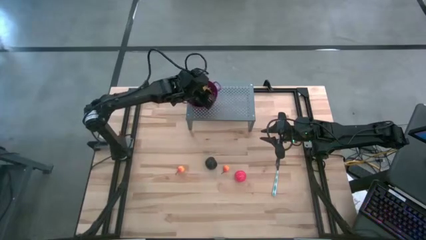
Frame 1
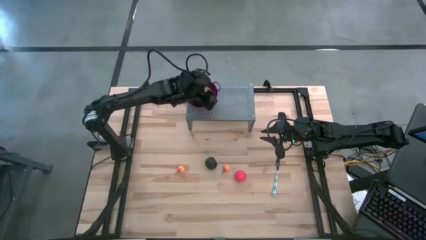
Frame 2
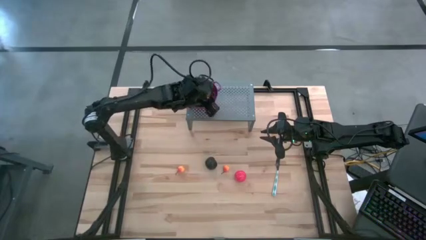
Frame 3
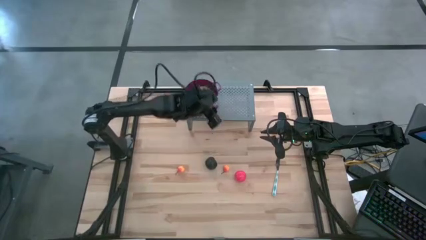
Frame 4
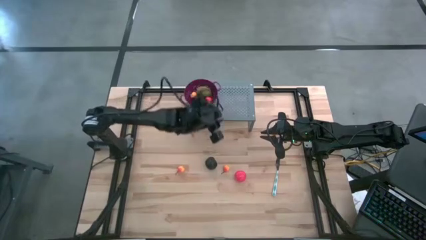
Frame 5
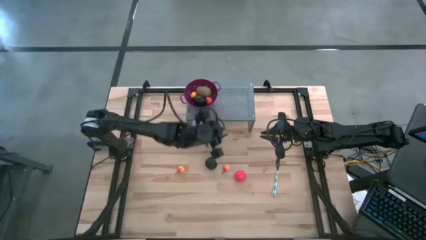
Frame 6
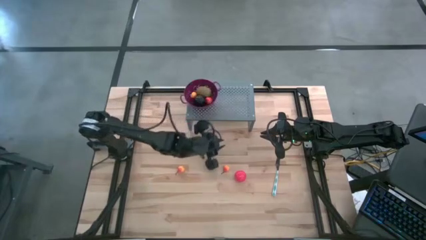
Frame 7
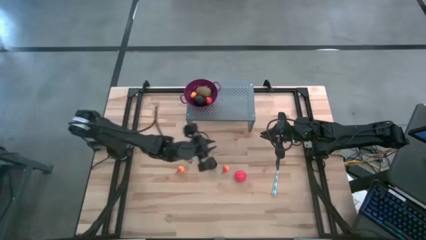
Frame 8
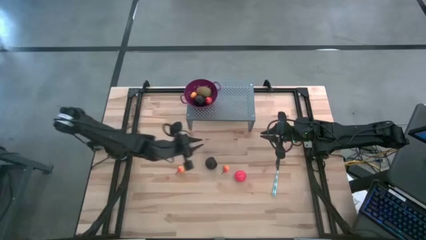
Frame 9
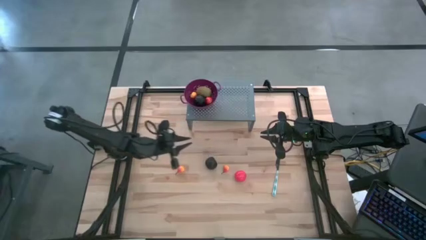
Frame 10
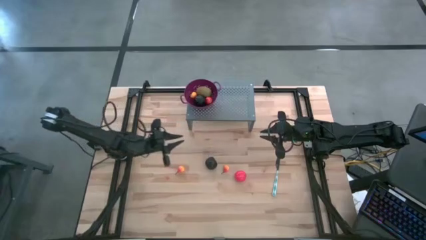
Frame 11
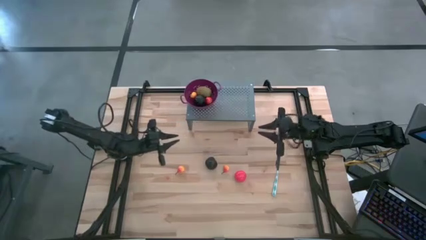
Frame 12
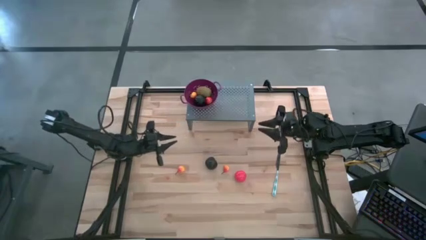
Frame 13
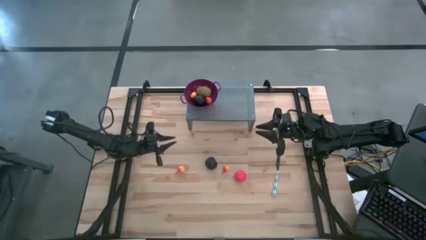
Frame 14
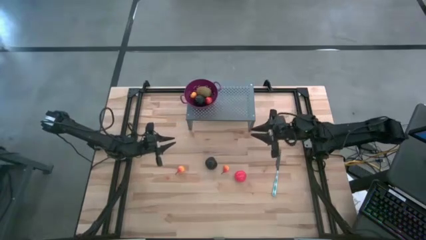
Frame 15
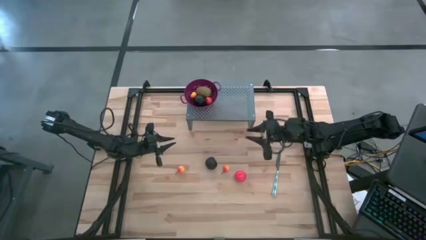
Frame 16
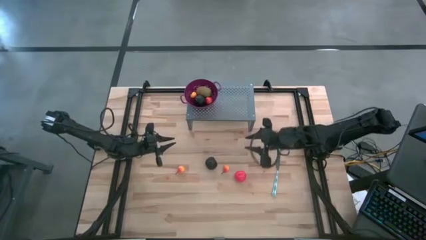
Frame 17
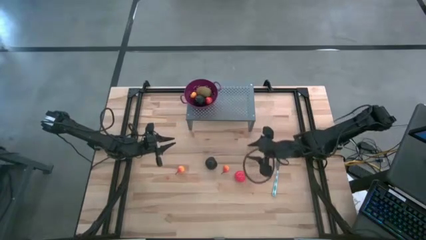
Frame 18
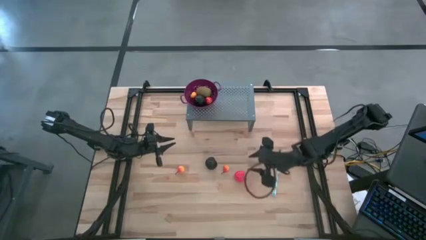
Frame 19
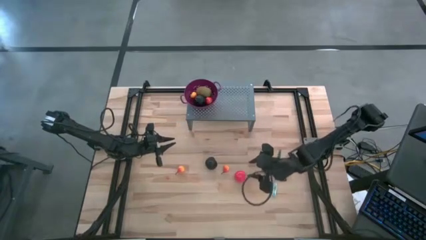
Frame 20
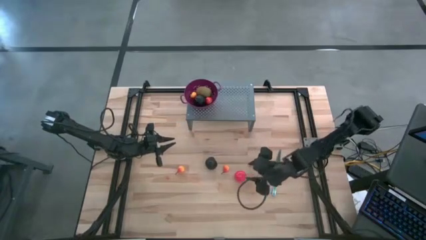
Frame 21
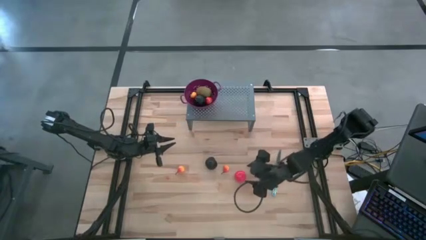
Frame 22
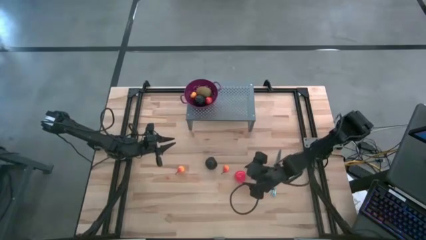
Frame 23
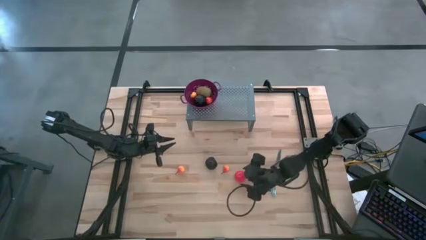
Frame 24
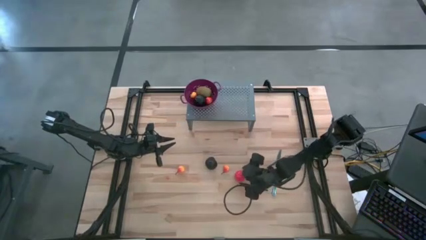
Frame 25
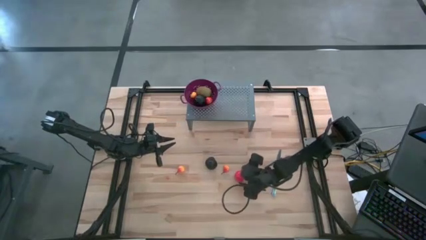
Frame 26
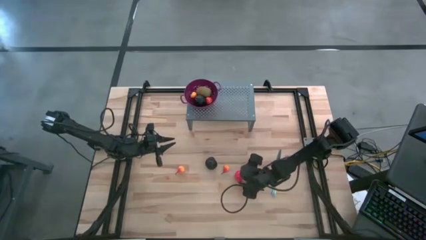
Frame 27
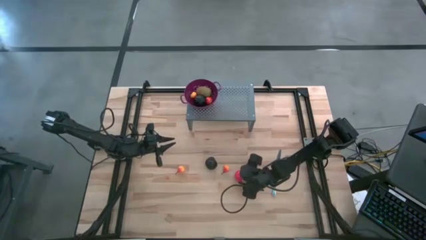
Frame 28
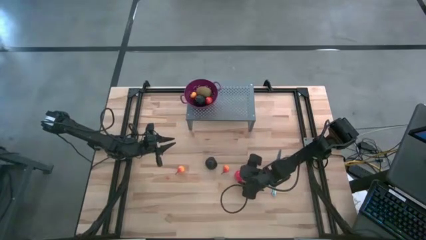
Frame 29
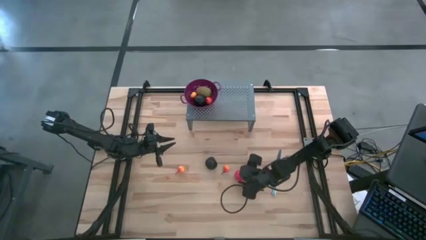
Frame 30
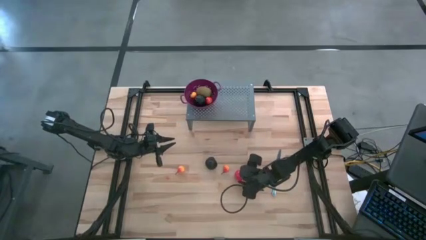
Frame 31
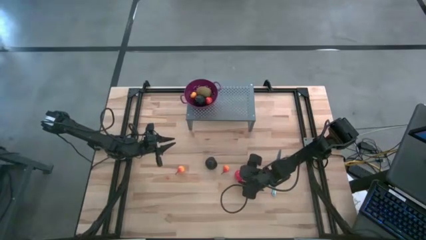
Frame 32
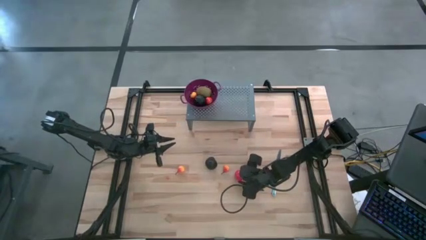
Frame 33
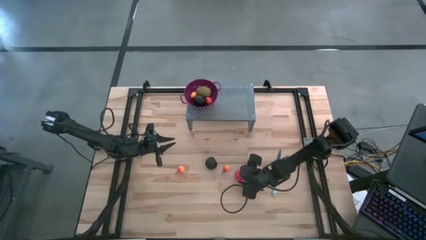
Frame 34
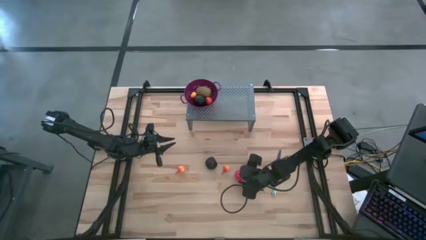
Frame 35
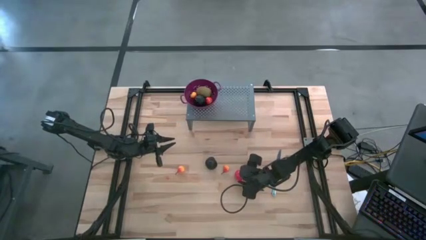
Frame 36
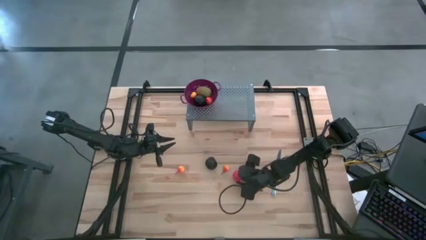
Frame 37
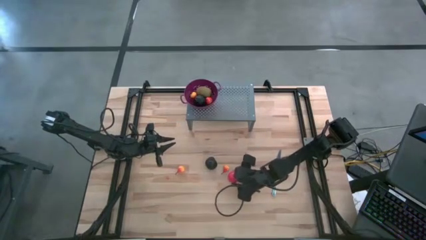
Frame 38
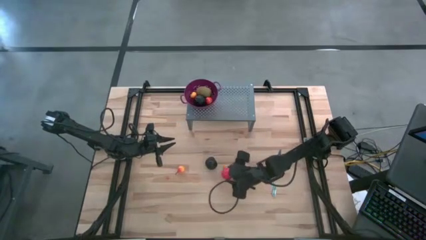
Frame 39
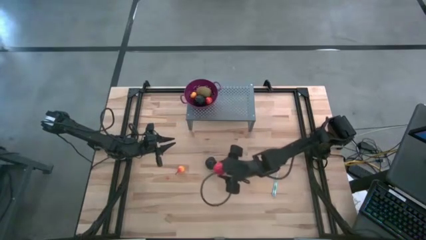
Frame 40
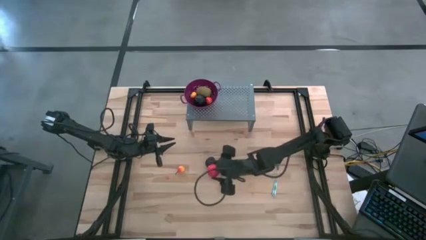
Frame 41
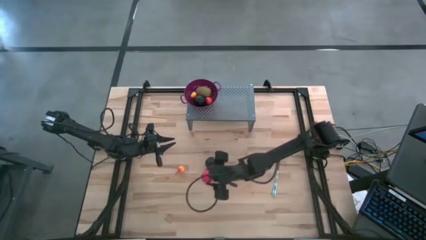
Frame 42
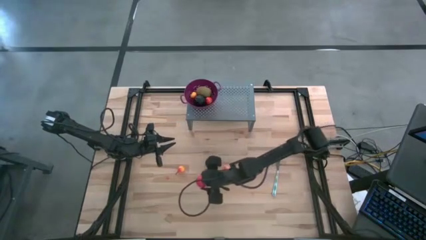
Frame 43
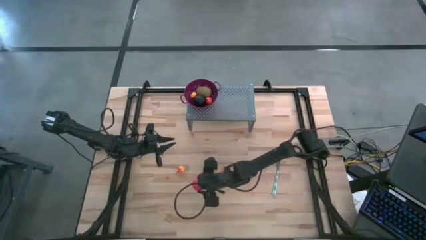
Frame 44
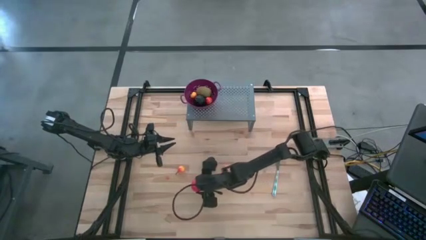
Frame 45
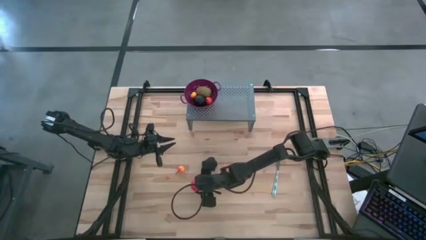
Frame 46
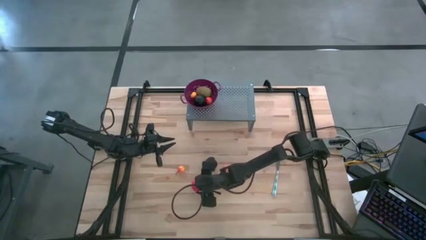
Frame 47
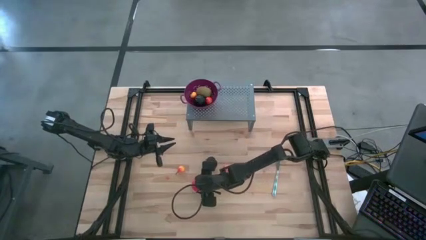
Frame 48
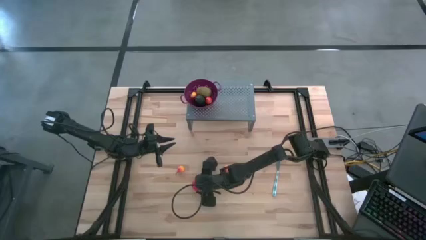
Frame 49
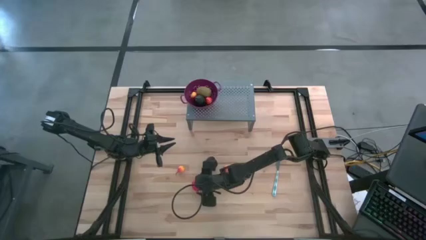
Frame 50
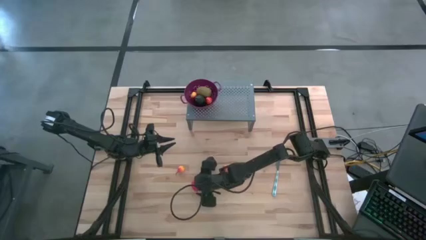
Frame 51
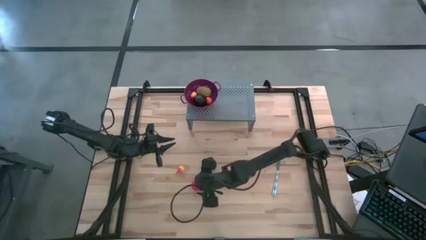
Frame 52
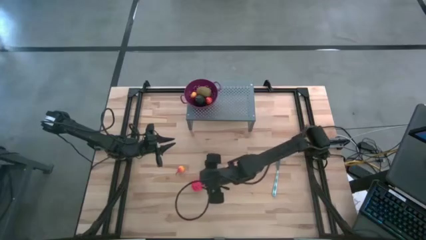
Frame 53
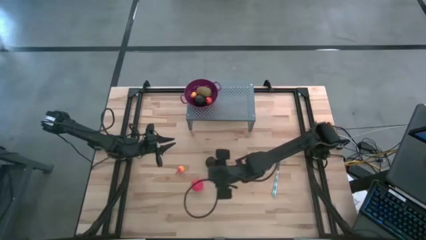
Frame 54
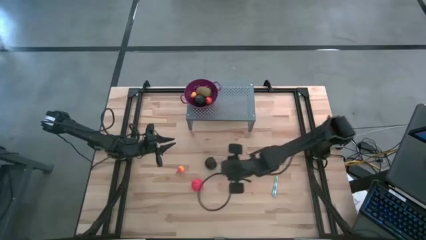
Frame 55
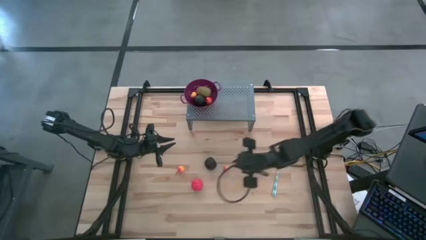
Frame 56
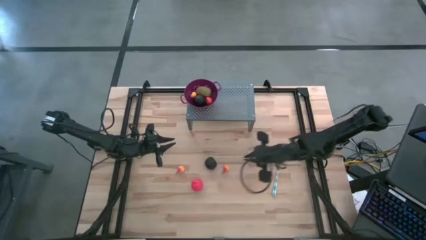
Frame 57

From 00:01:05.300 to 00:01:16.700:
Task: Pick & Place Fruit
Put the red tomato into the purple strainer bowl on the shelf

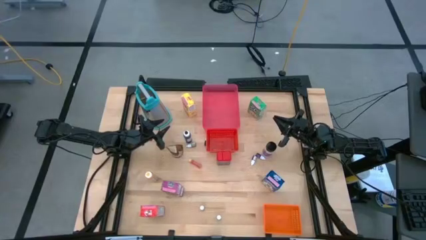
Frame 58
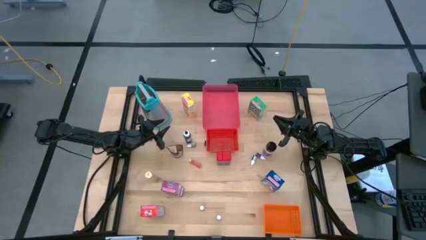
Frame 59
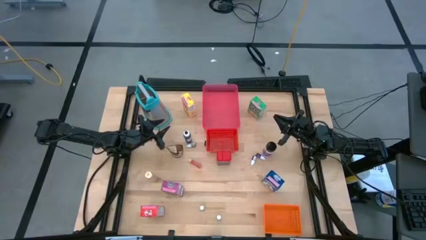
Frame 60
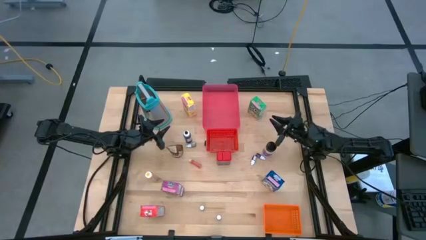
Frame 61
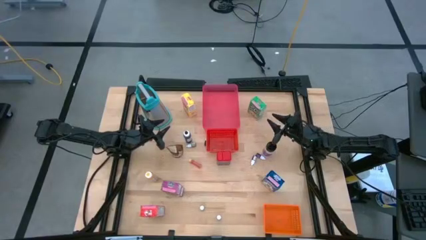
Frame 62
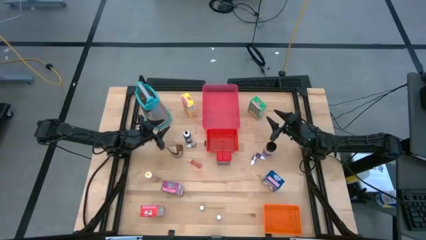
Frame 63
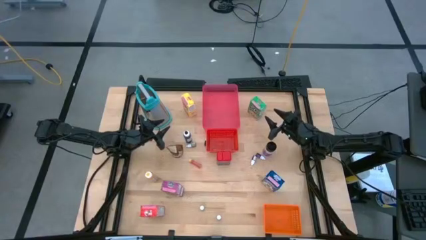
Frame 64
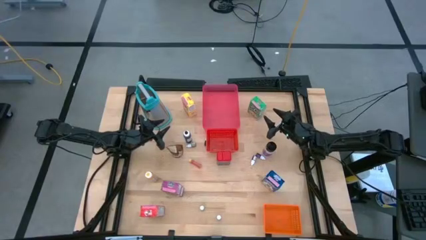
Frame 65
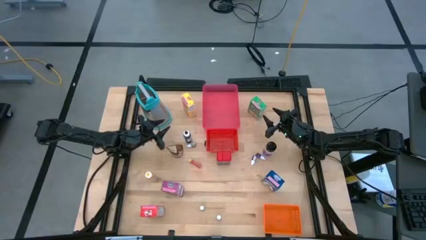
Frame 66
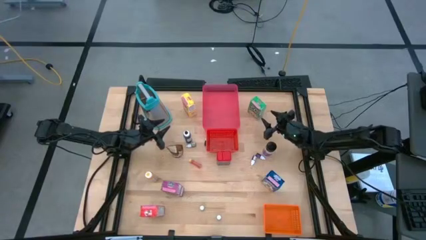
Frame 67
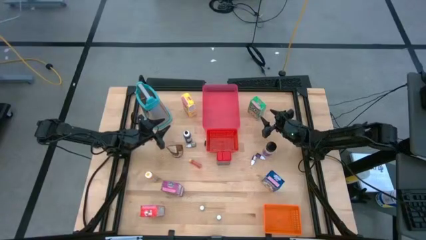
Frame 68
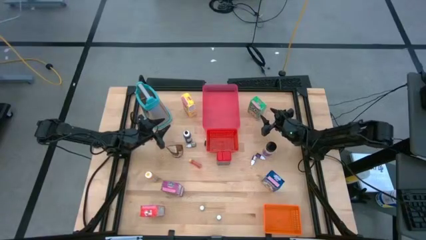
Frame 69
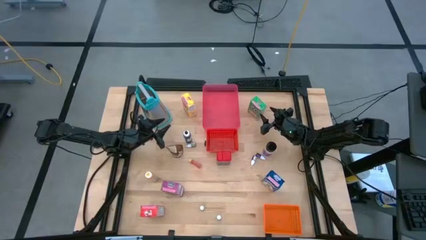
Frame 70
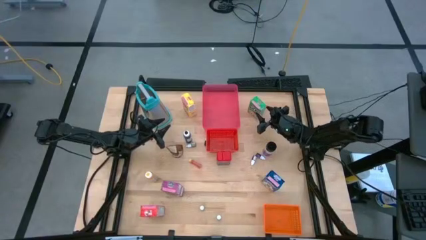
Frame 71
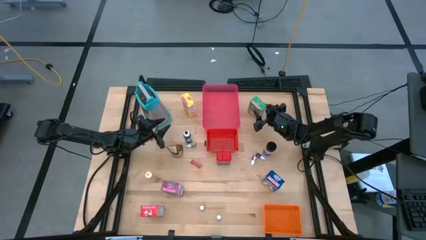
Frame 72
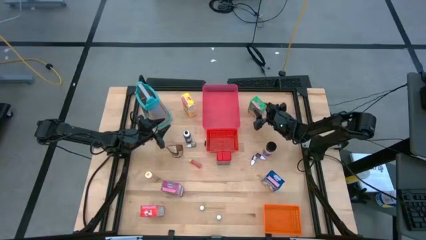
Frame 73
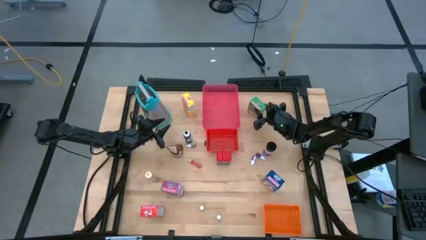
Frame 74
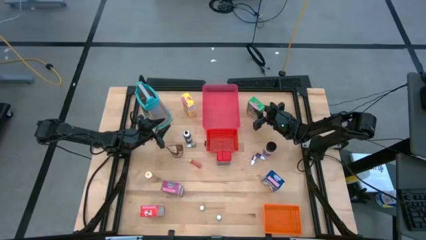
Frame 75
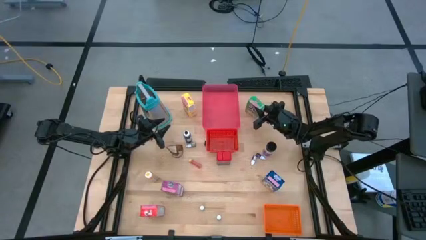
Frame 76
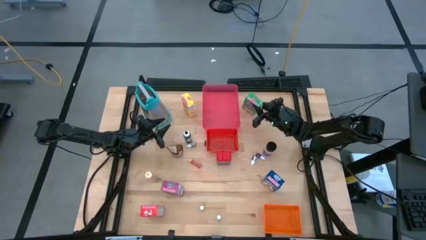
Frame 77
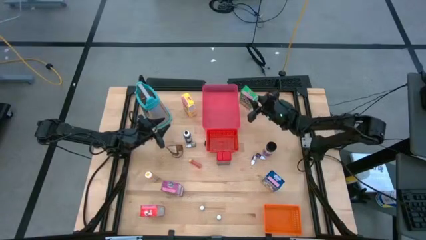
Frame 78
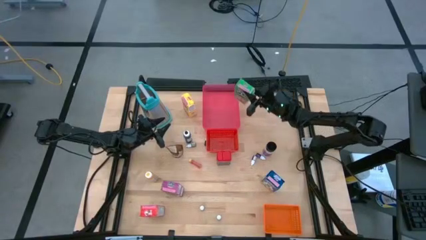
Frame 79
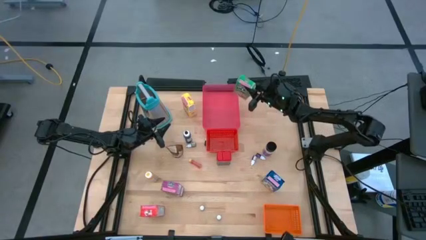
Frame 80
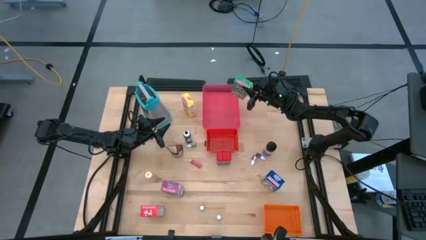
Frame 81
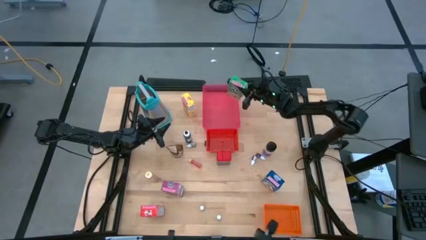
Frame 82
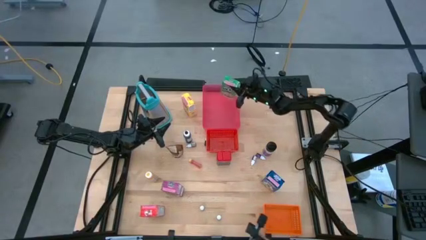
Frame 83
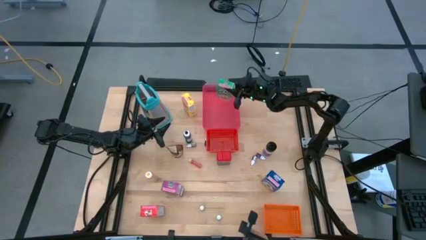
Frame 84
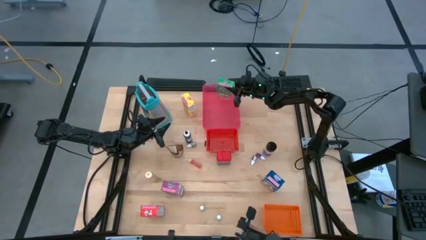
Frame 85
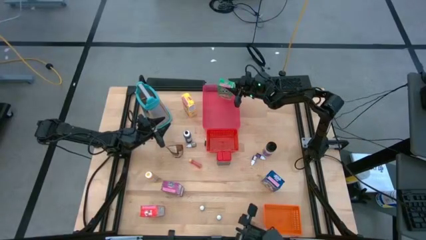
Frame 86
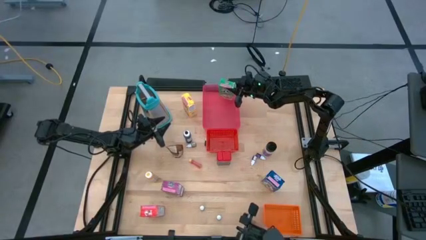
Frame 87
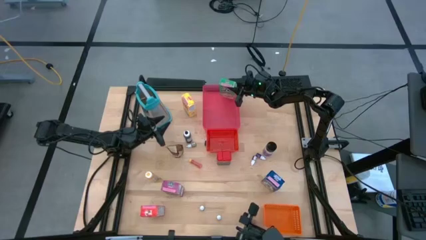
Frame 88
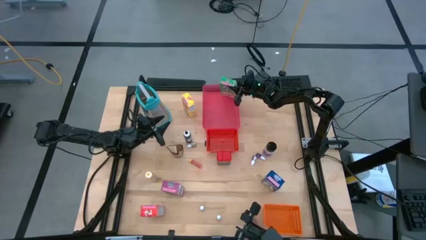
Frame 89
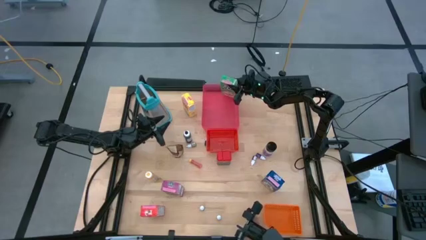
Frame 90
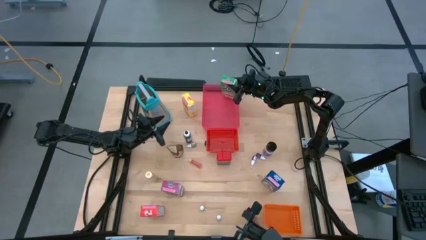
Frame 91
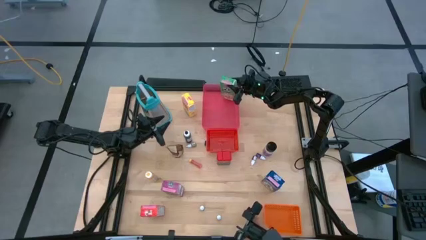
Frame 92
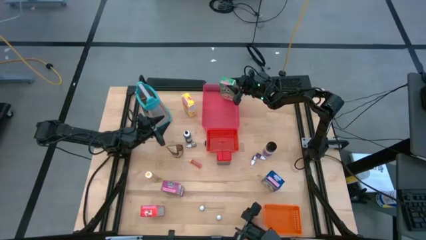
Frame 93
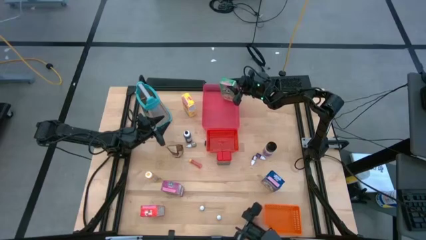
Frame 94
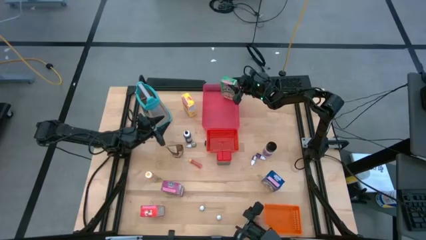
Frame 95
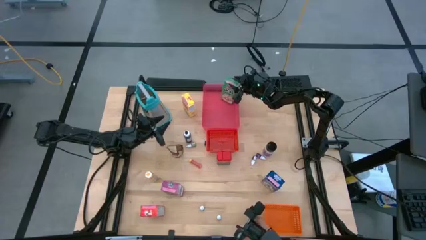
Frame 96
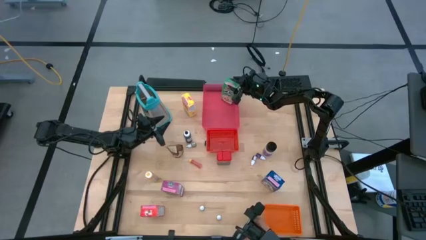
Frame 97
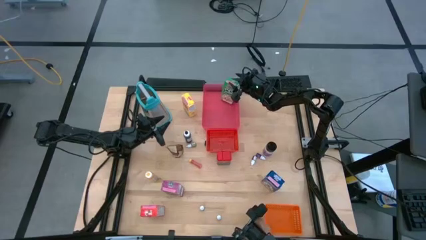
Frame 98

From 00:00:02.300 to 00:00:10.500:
Task: Pick & Place Kitchen Items
Put the green cereal box into the pink bin
